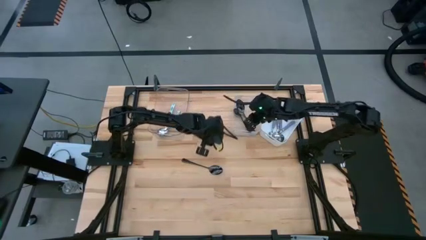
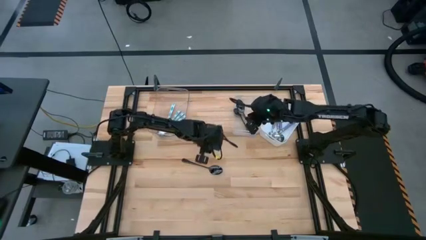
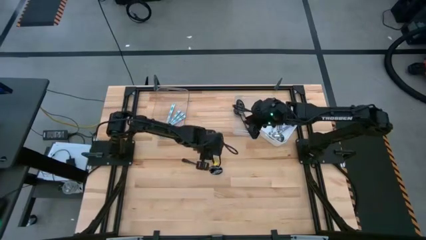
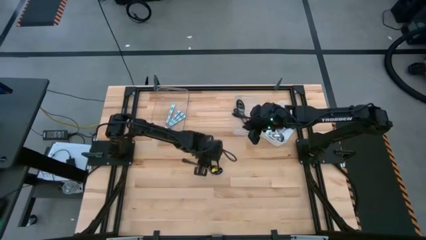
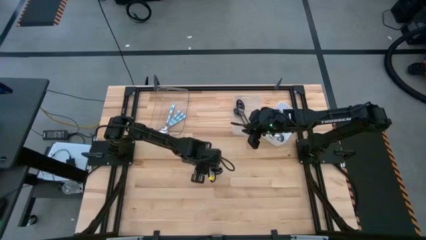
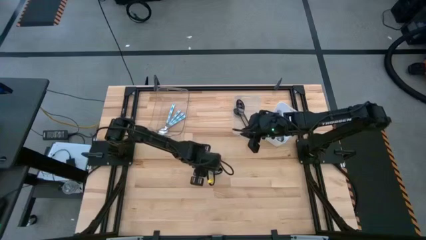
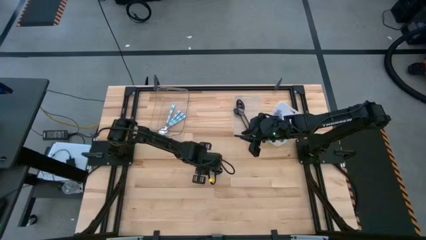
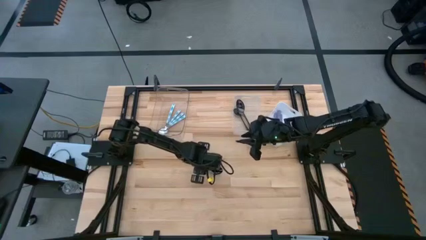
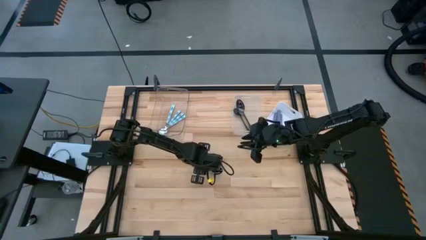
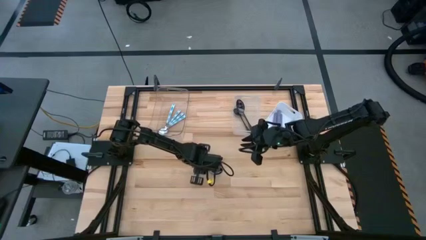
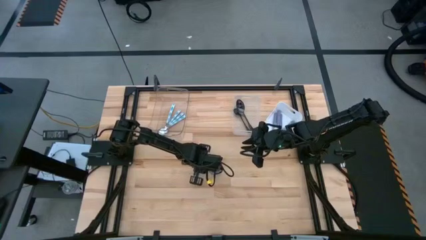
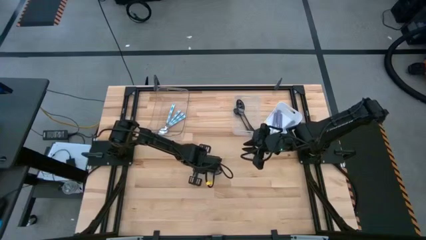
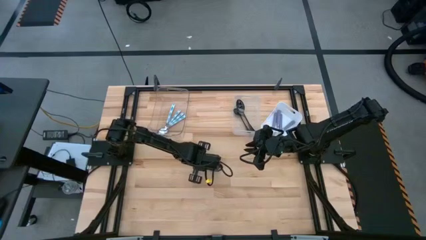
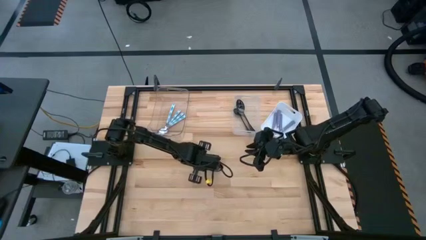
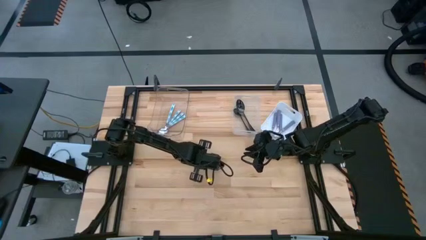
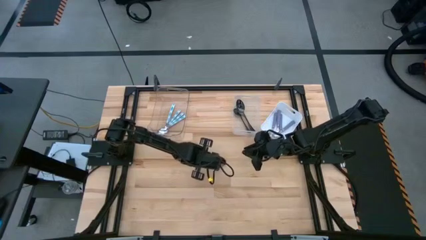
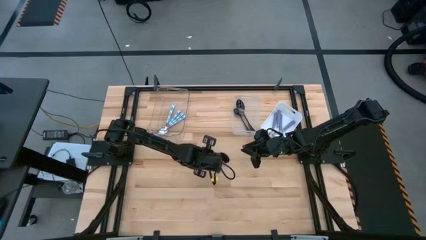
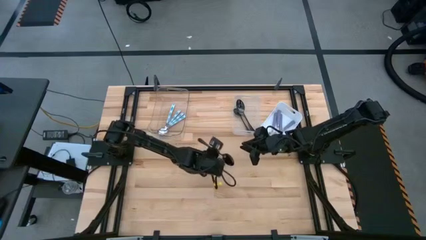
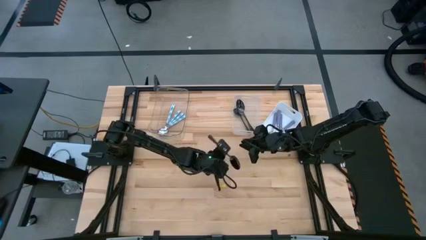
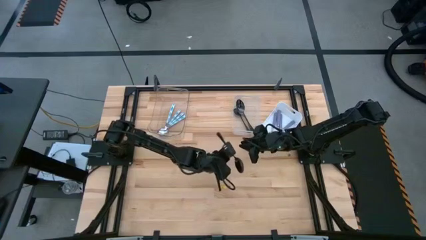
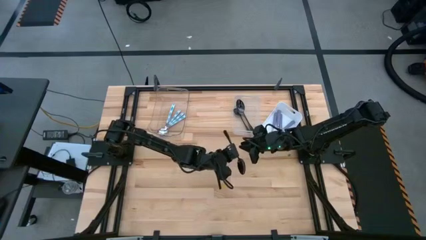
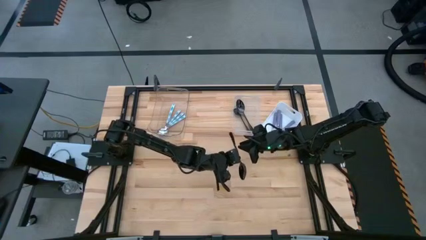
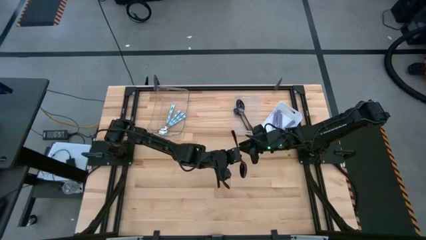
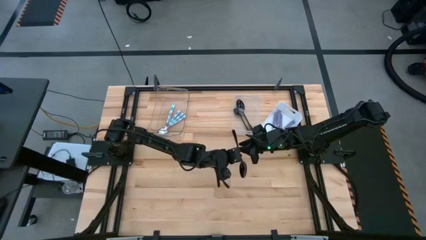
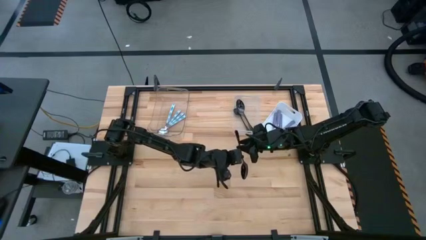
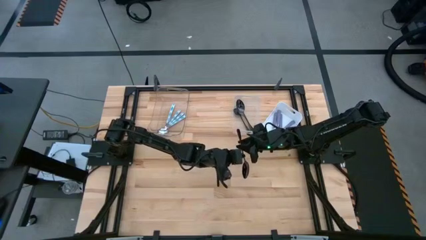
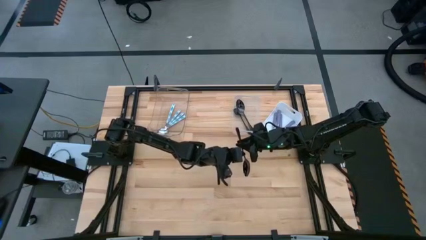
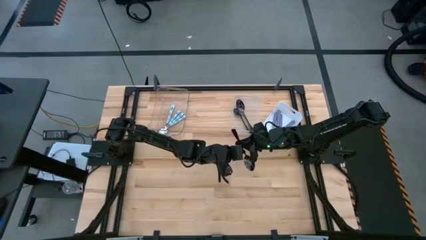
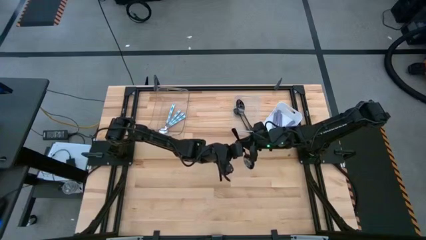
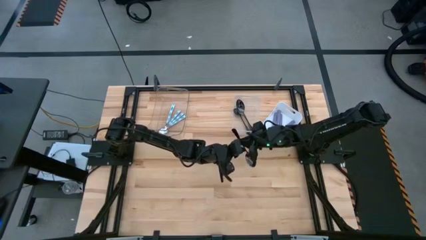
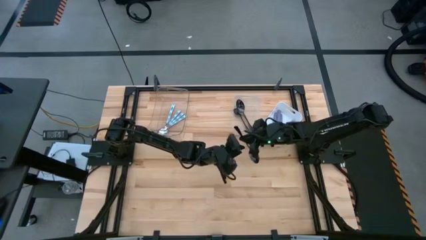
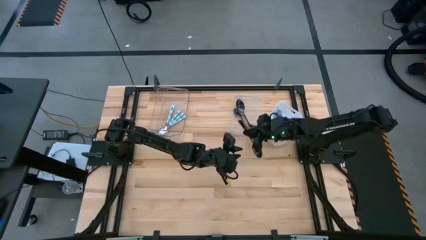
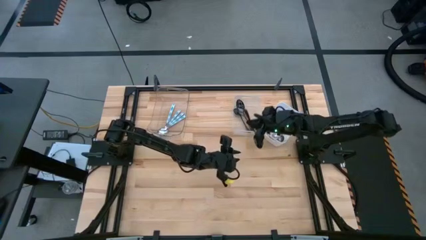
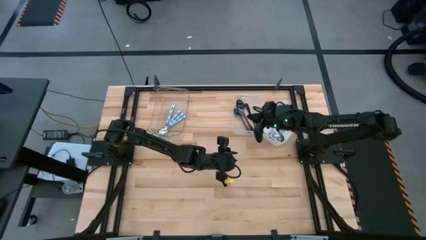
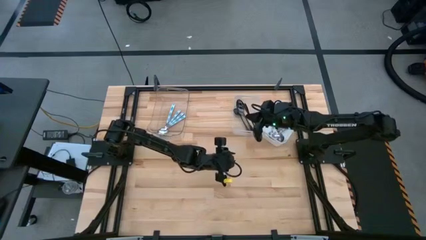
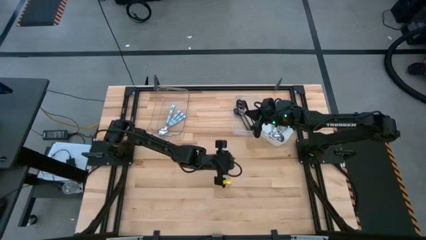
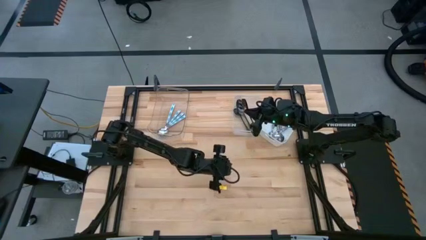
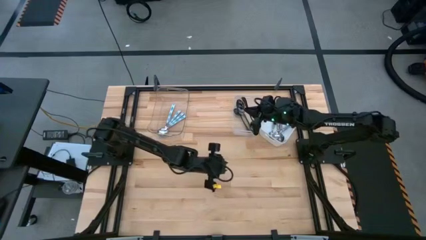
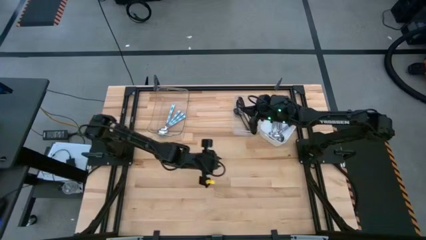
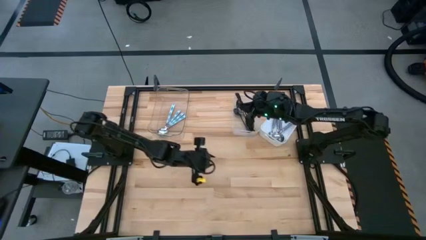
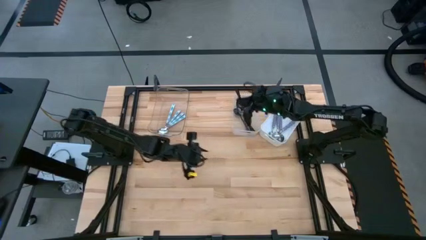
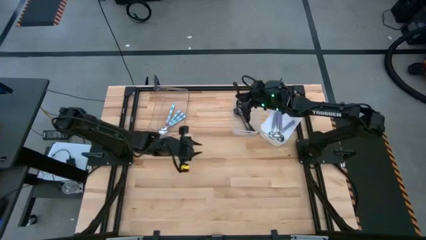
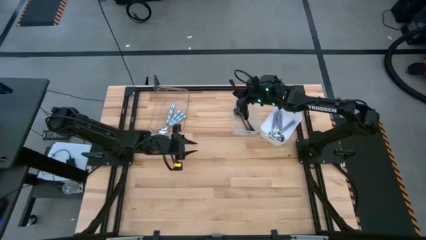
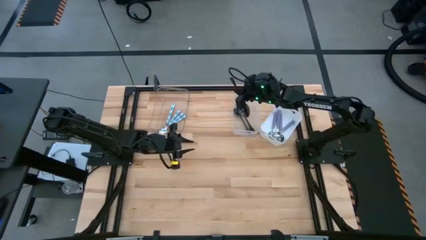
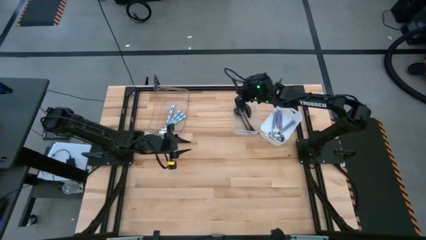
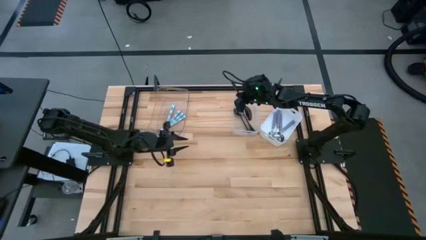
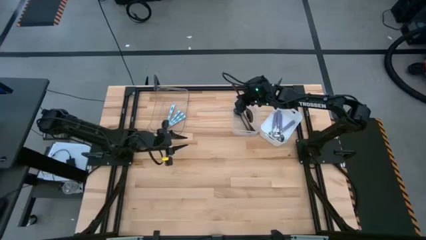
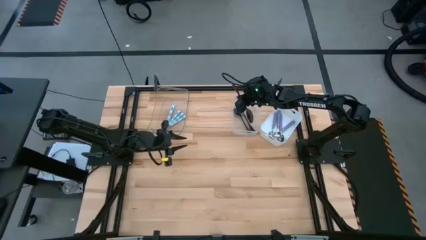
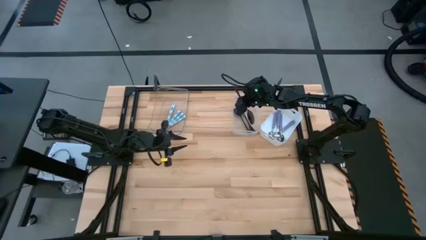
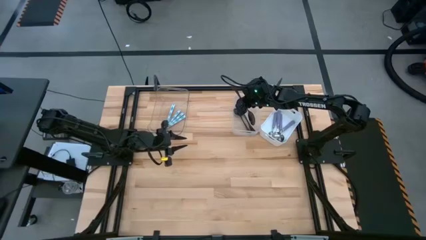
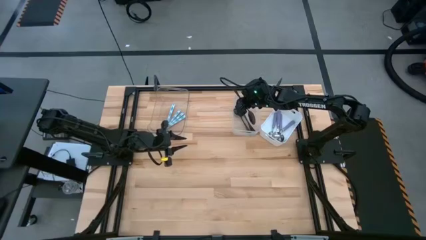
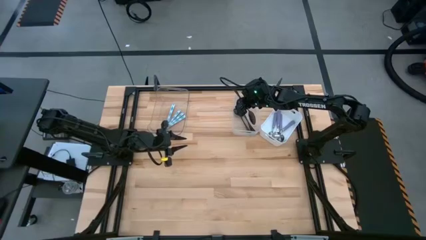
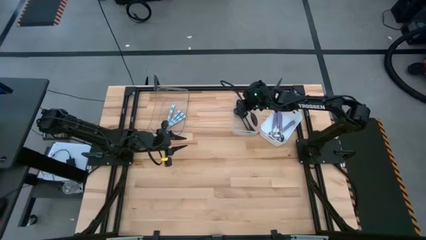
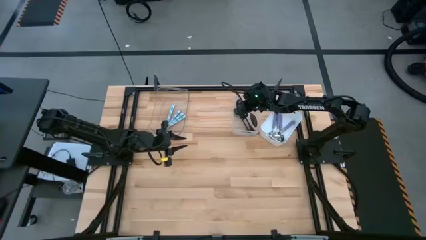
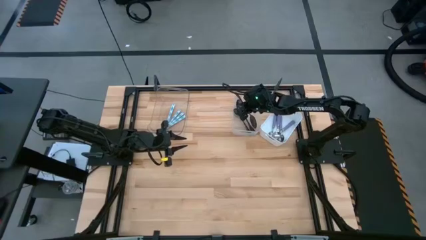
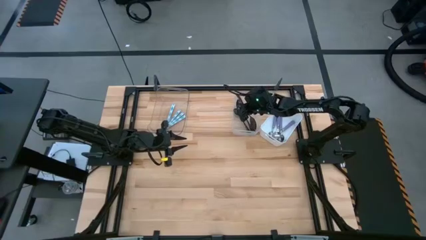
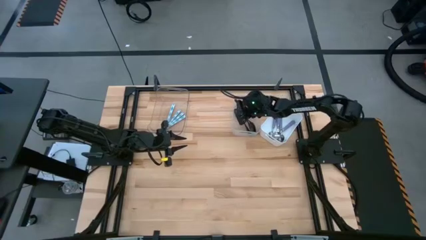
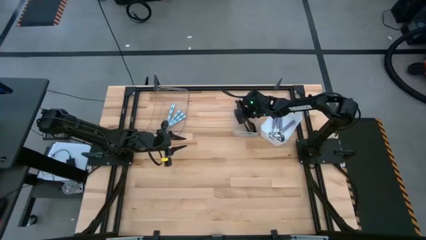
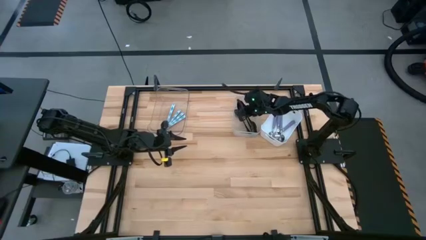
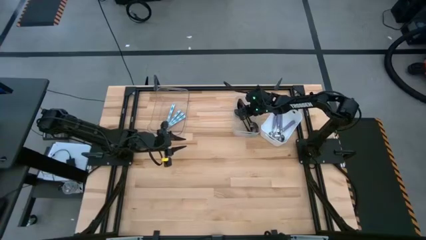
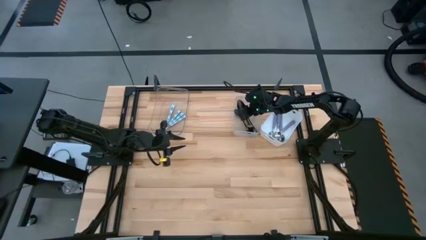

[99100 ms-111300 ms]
Task: Sort silverware by color (type)
Put the black spoon into the transparent white bin
